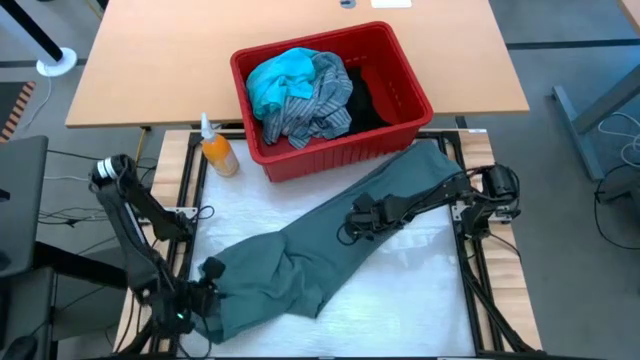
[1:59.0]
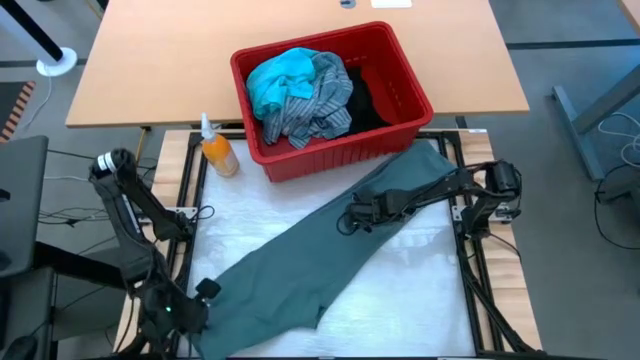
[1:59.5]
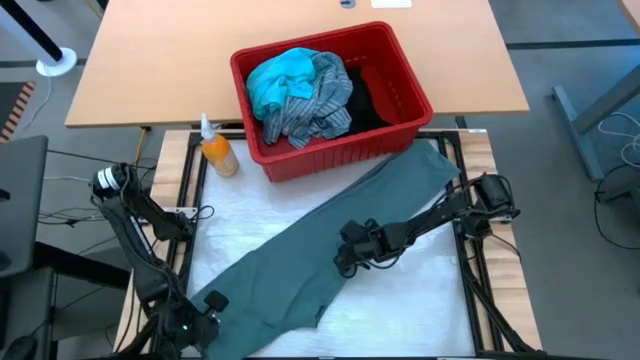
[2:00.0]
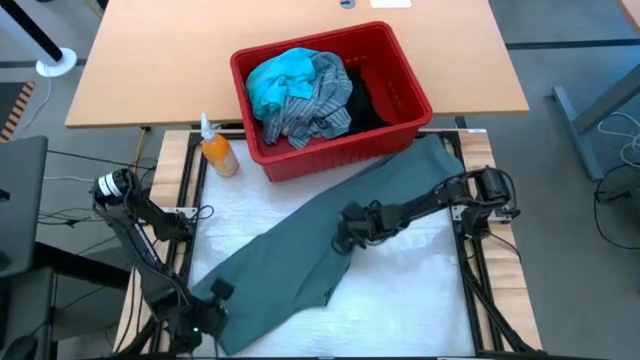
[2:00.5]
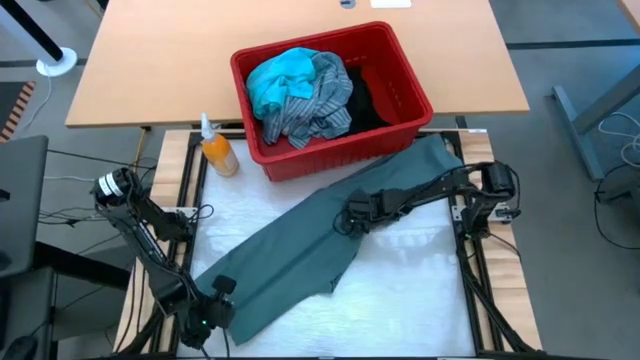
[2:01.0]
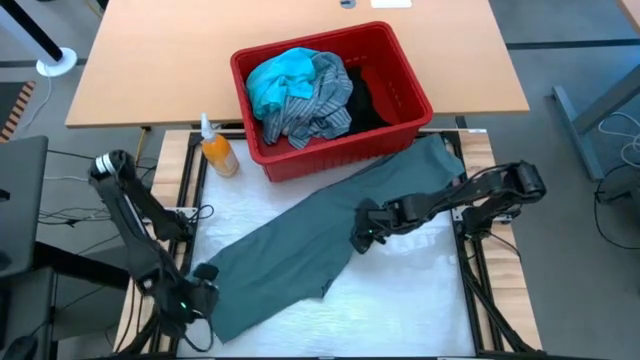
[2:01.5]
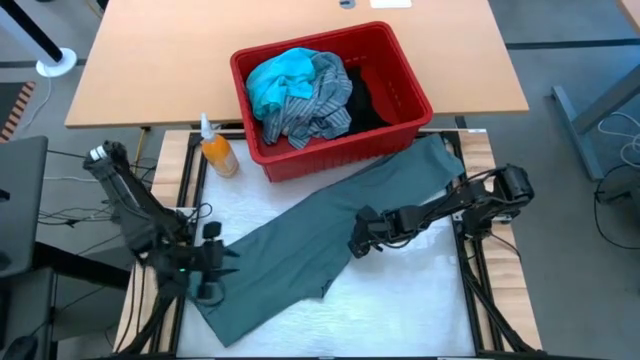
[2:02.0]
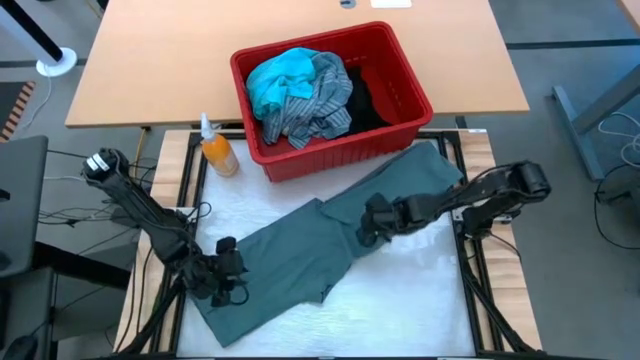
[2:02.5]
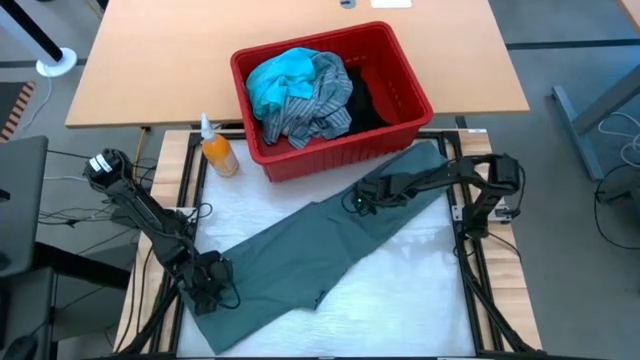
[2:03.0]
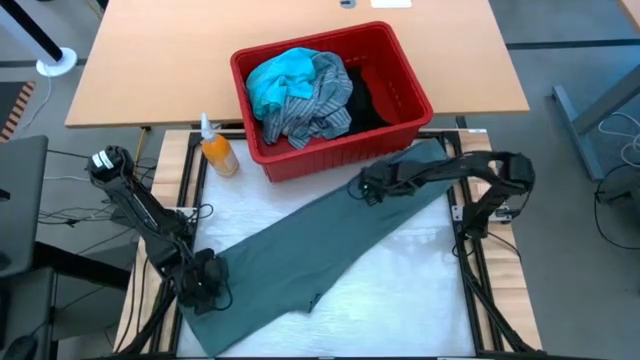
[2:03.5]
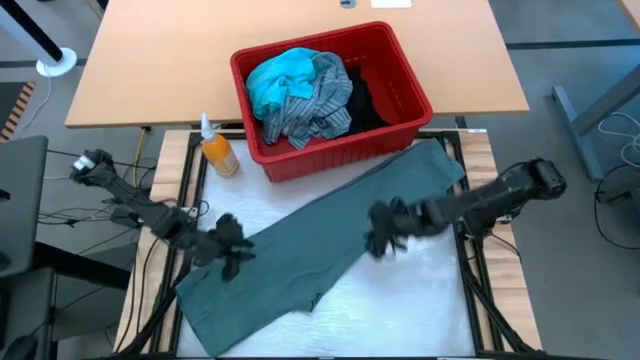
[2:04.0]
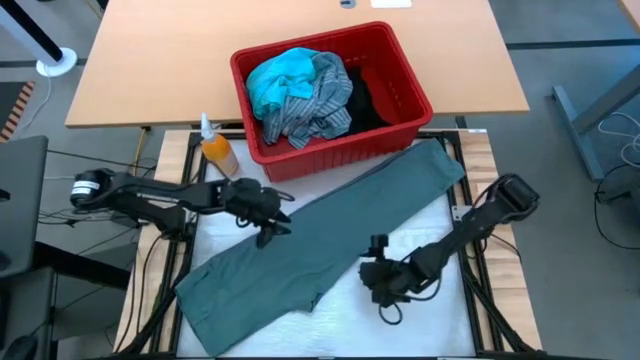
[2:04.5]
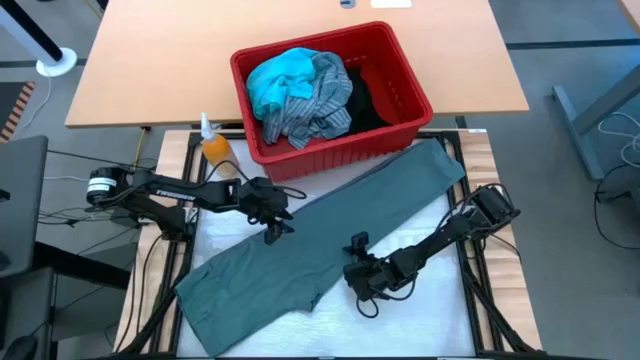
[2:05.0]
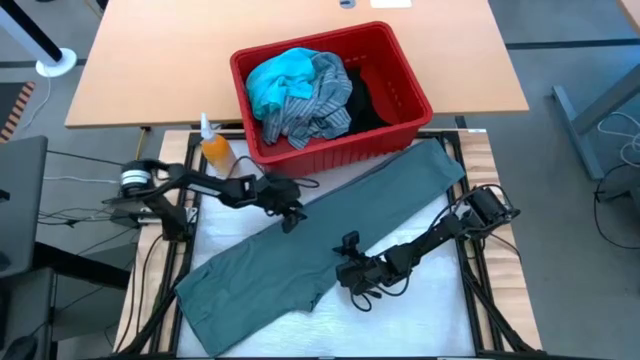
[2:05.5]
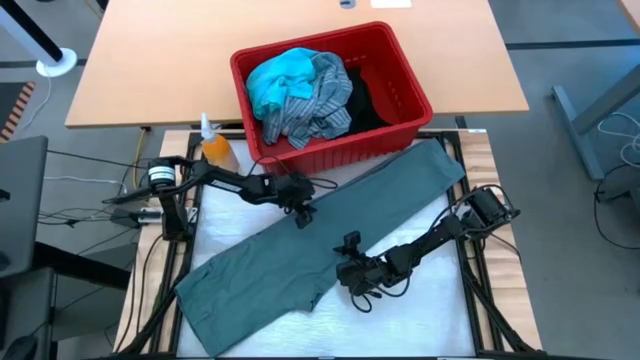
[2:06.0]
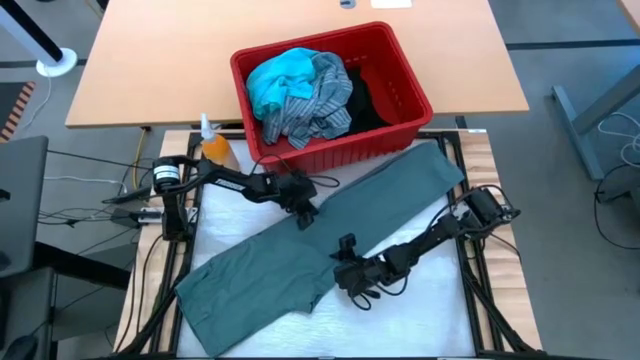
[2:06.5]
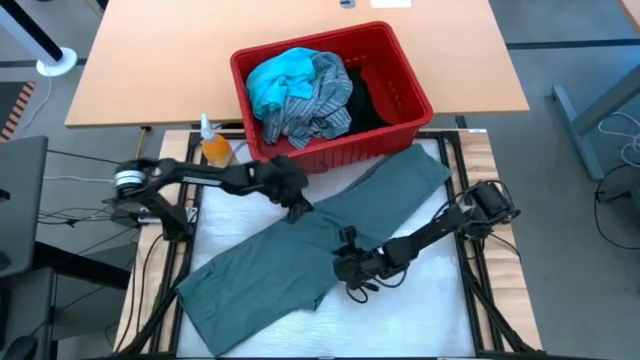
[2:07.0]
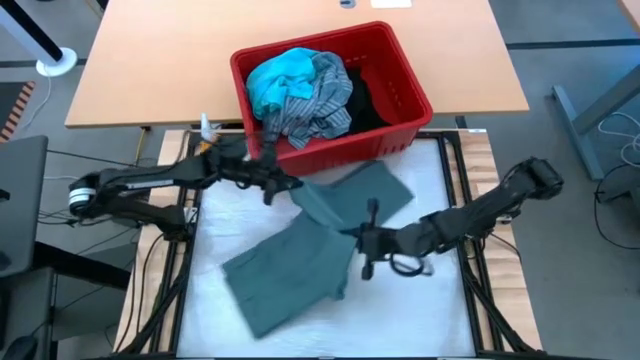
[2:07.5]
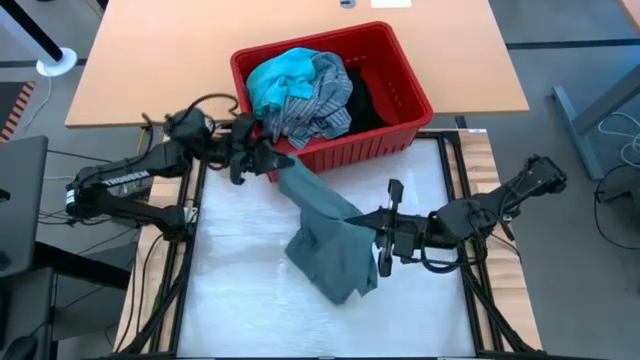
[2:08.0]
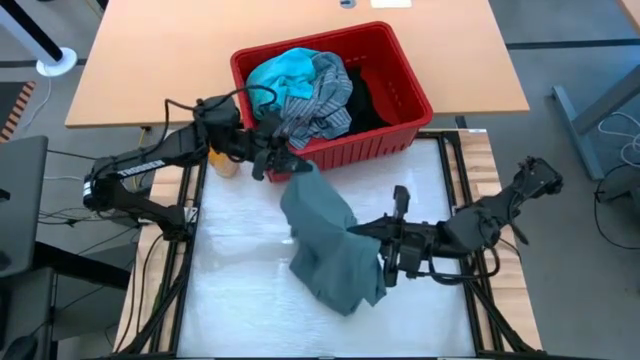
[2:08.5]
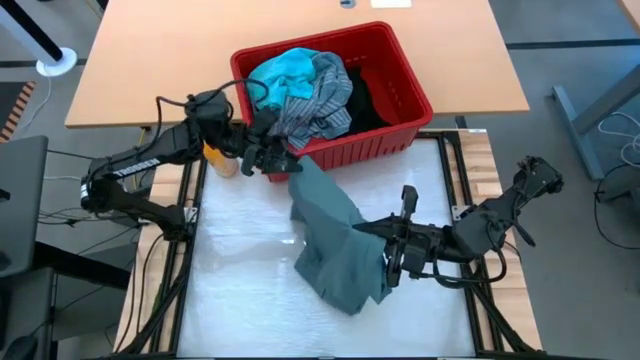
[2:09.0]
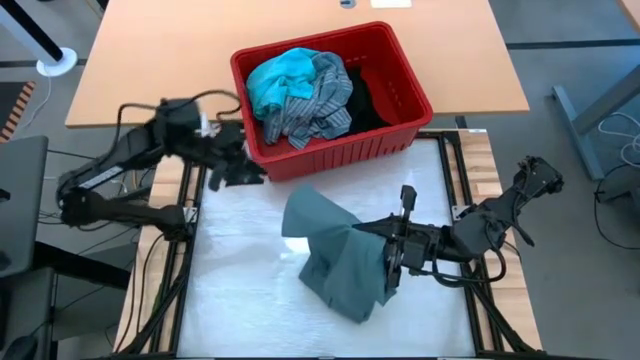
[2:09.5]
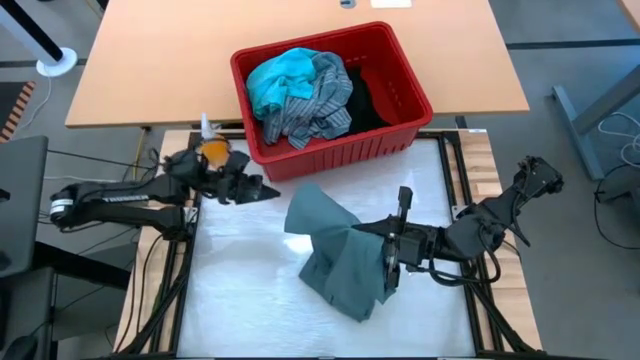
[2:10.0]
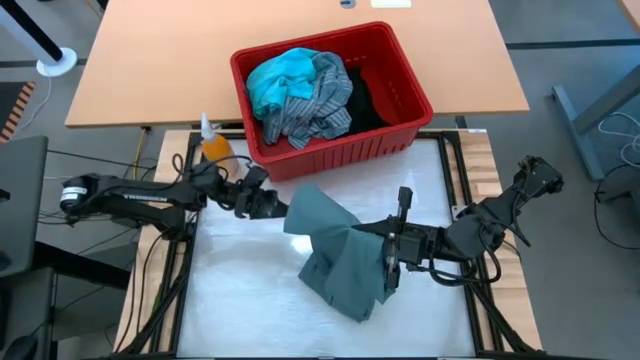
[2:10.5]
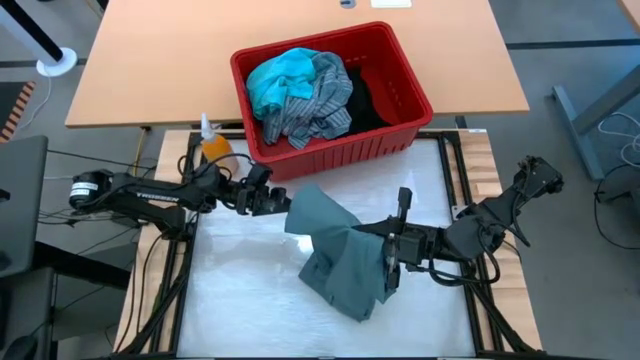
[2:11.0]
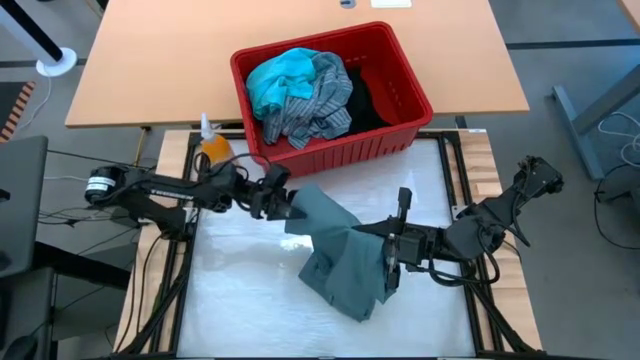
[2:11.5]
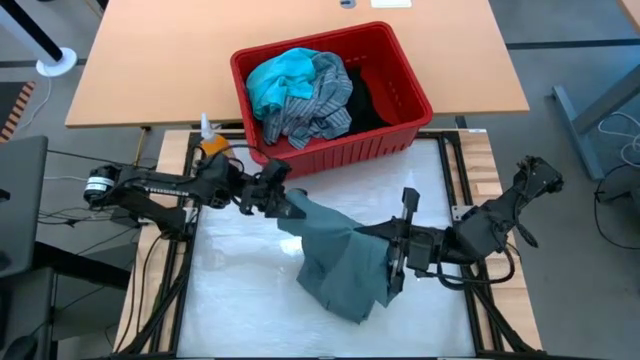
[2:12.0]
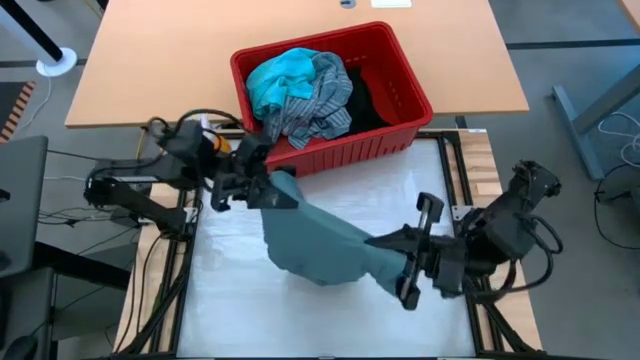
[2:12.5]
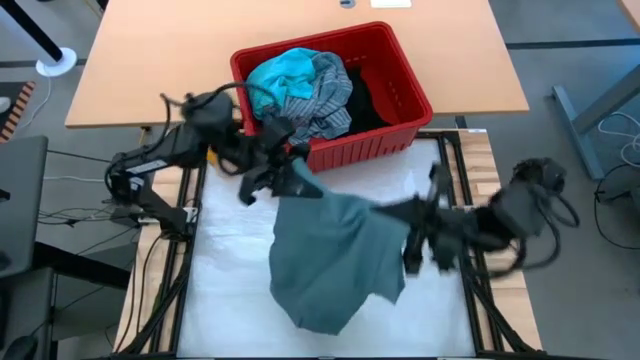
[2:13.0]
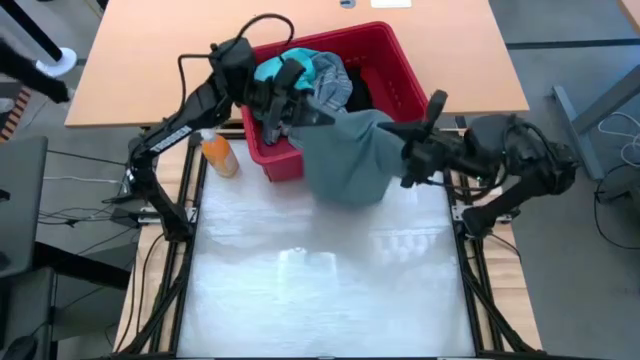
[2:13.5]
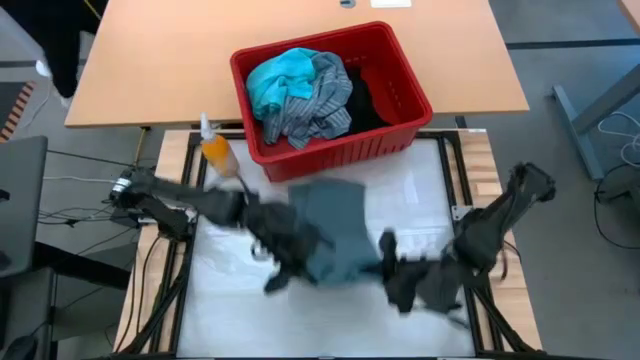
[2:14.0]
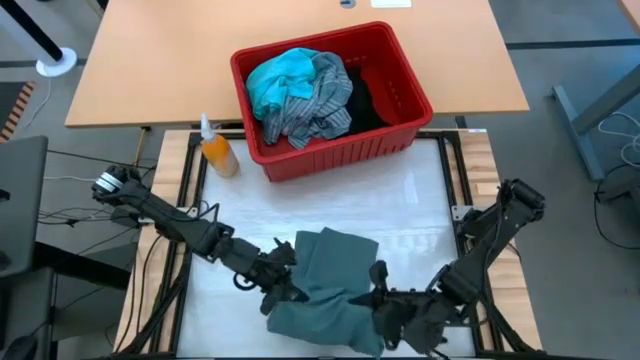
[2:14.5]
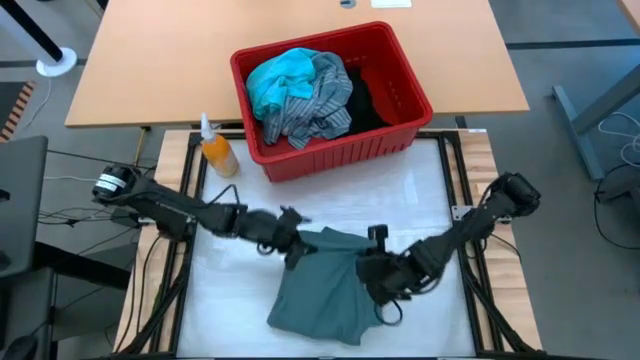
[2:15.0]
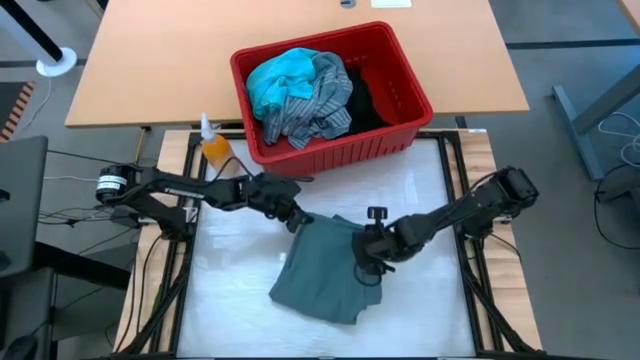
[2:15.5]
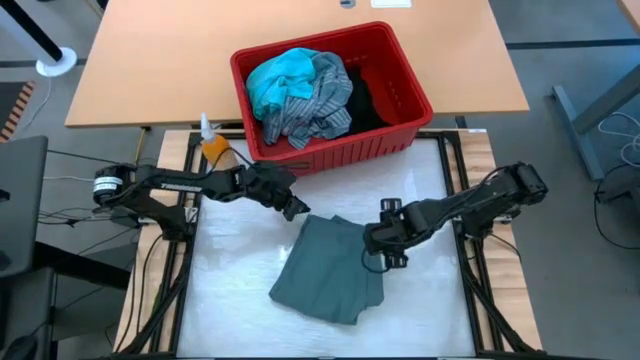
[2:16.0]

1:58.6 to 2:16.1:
Task: Fold Laundry from Bin
Fold the dark blue pants

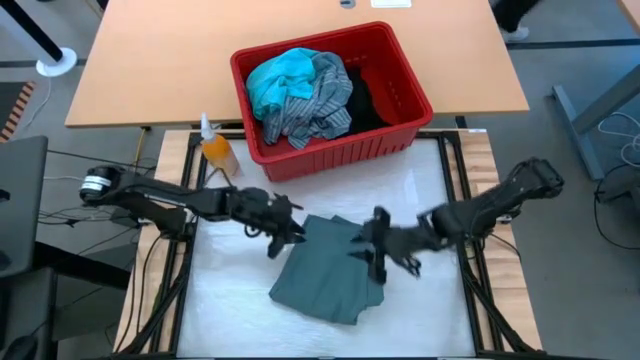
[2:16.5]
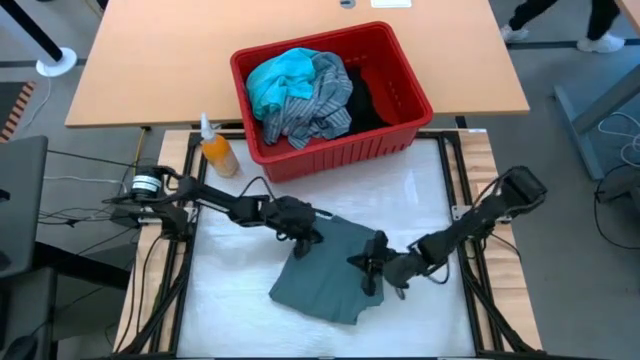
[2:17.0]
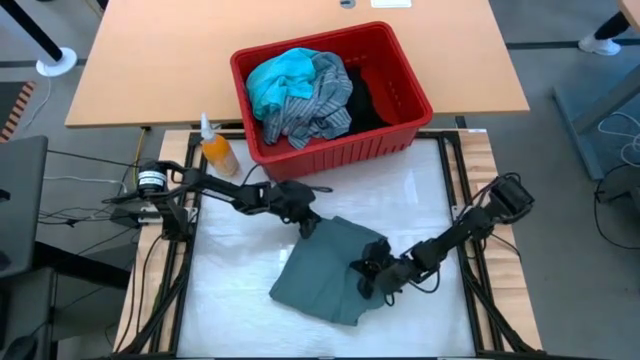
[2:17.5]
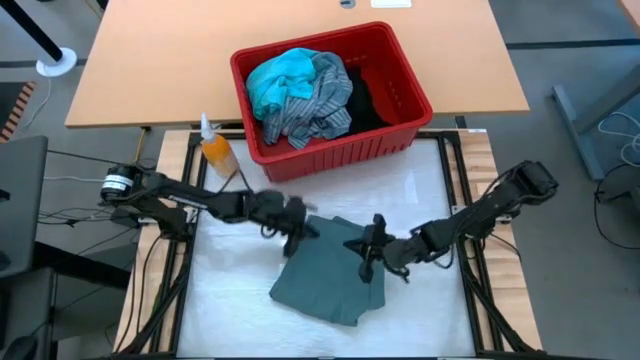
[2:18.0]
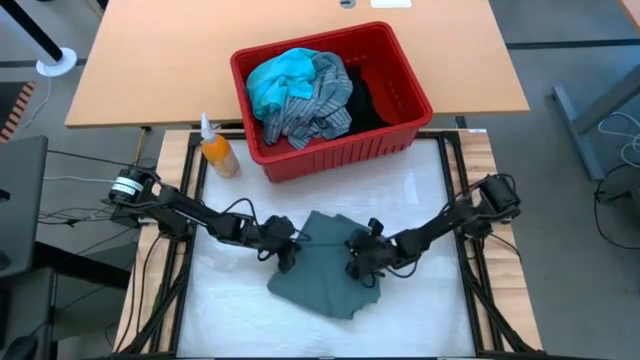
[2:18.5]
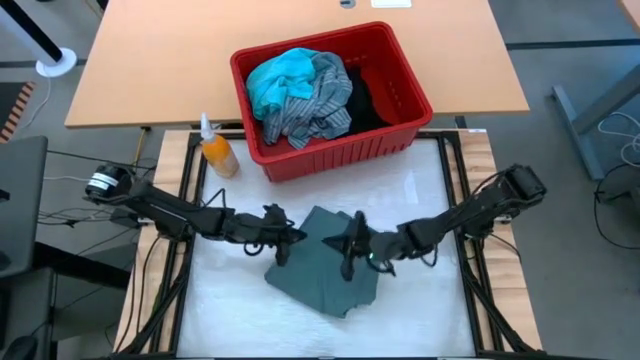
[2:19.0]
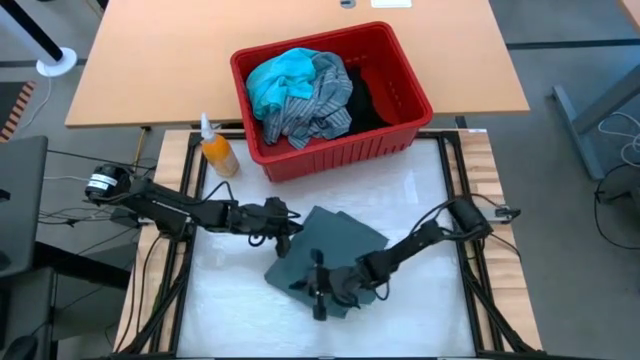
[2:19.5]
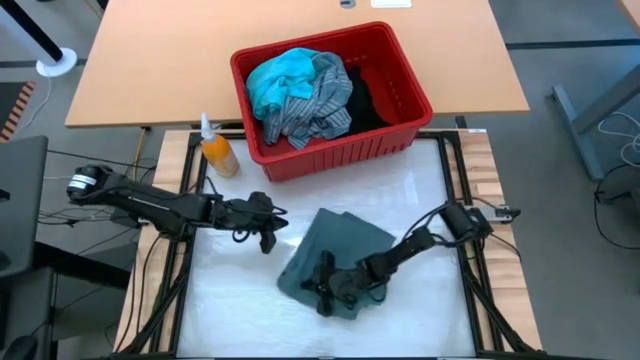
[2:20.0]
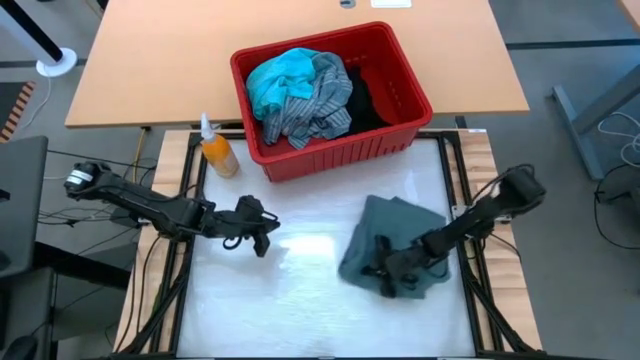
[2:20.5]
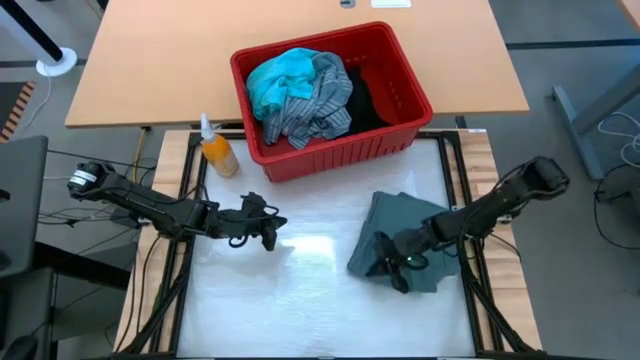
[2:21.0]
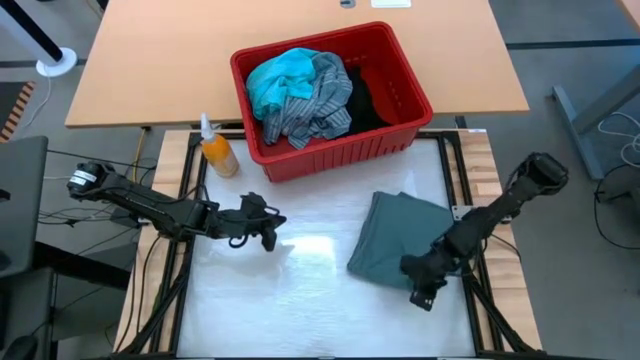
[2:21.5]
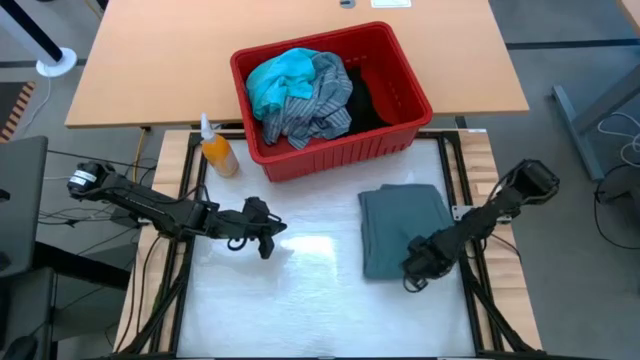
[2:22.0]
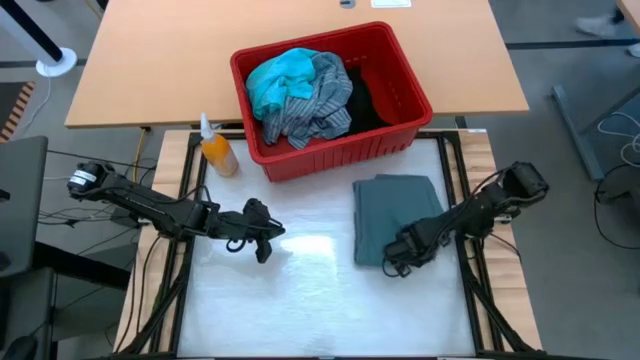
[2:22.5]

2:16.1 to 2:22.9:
Move the folded dark blue pants to the top right of the table
